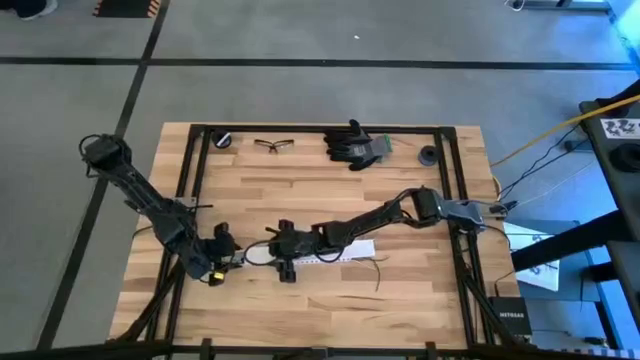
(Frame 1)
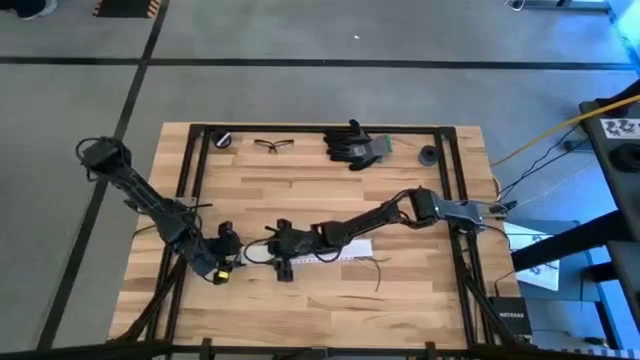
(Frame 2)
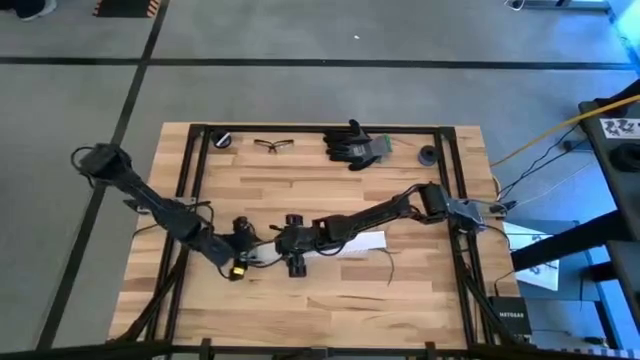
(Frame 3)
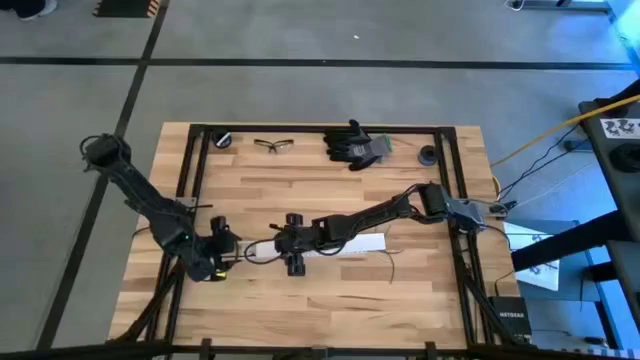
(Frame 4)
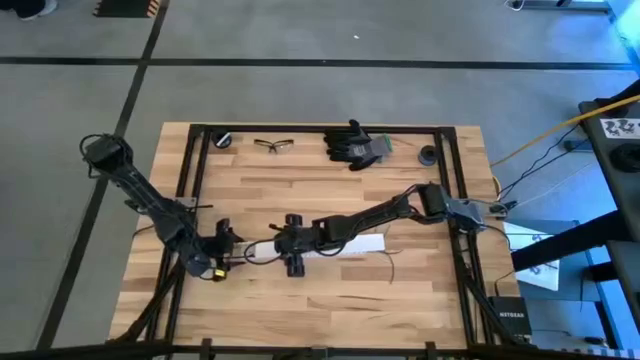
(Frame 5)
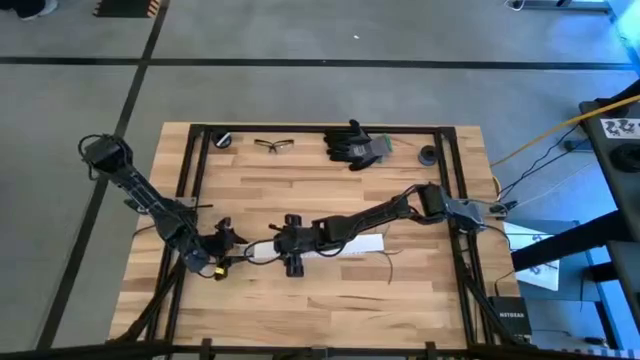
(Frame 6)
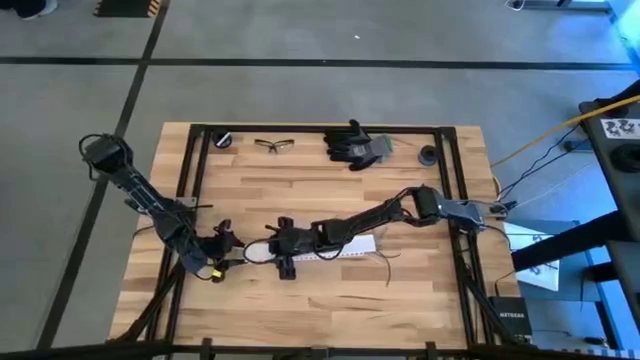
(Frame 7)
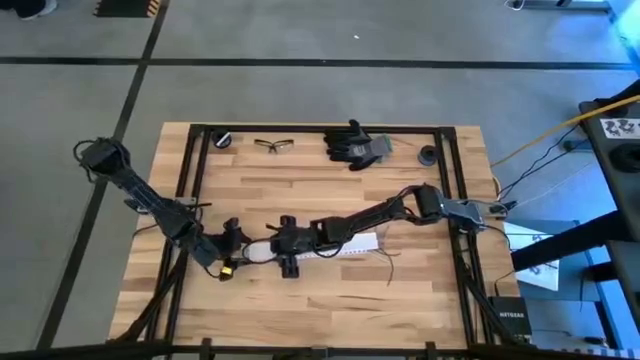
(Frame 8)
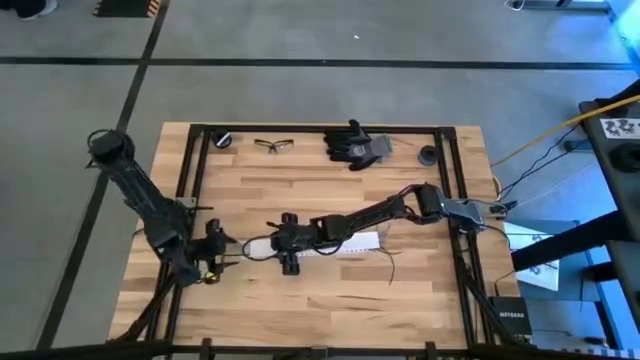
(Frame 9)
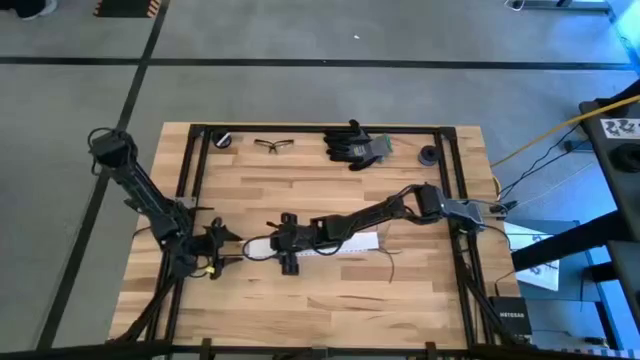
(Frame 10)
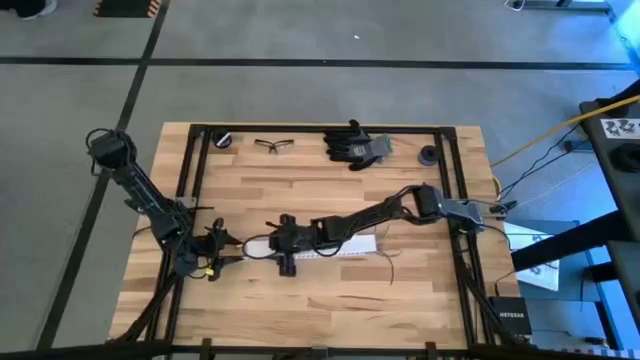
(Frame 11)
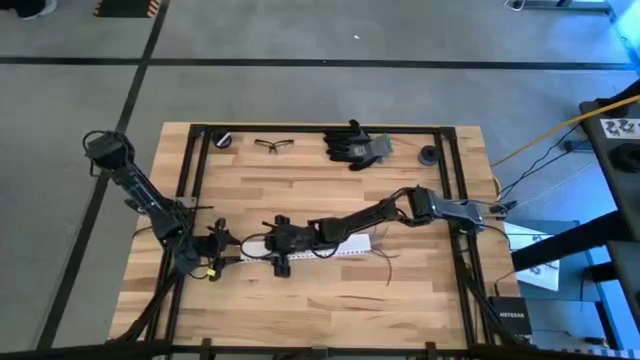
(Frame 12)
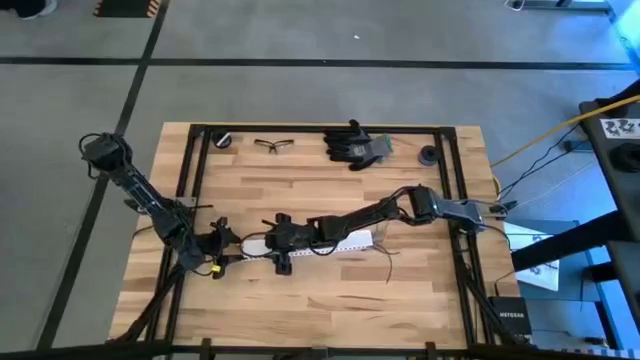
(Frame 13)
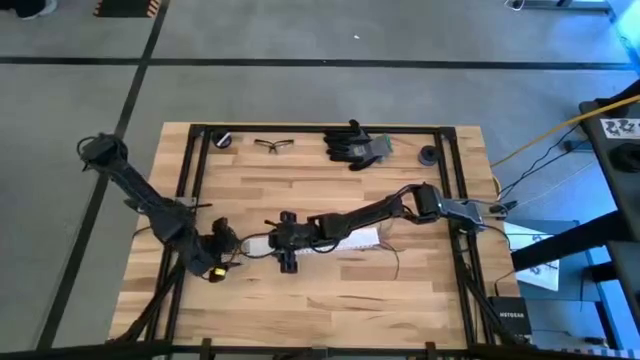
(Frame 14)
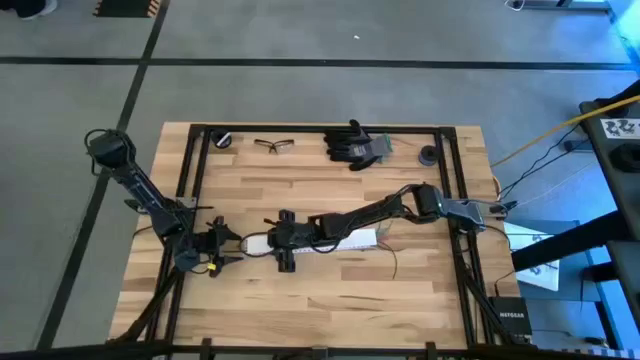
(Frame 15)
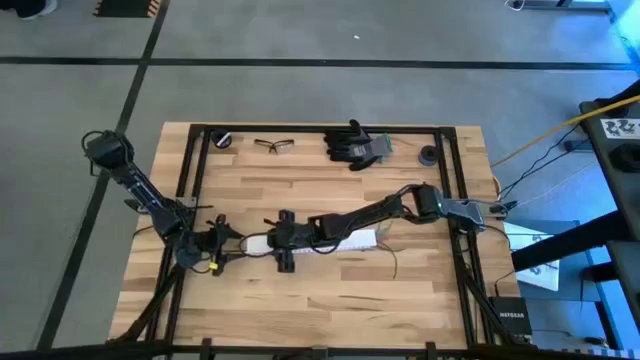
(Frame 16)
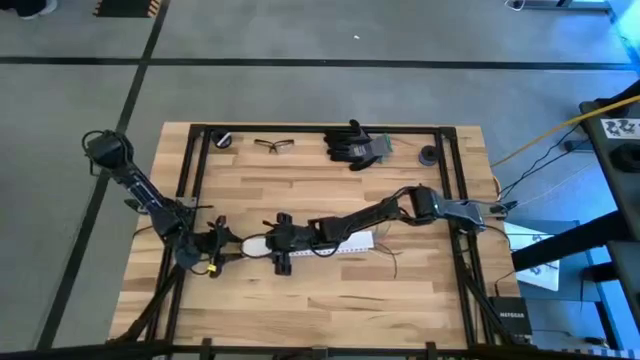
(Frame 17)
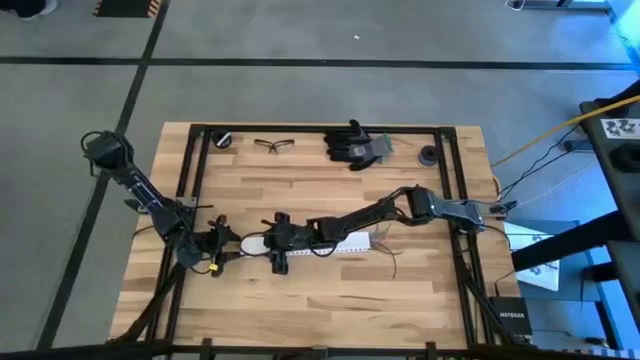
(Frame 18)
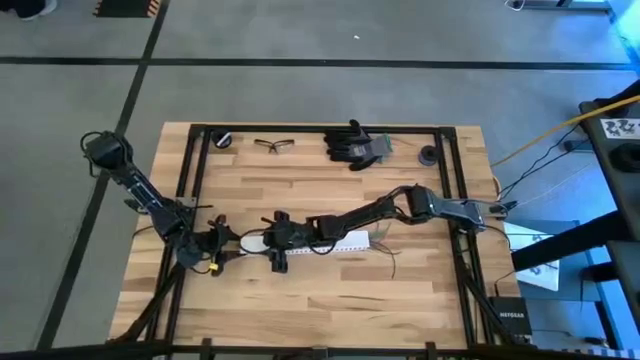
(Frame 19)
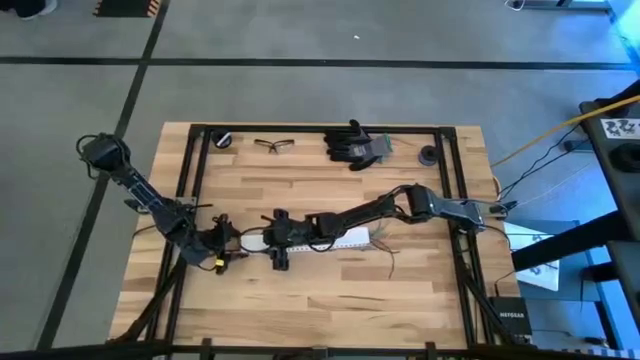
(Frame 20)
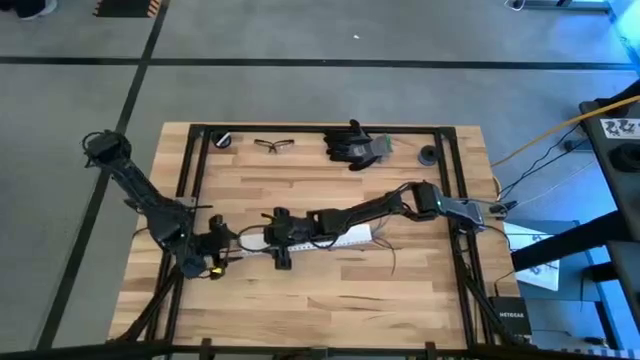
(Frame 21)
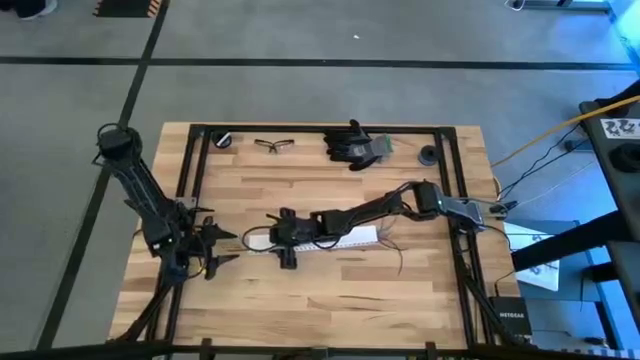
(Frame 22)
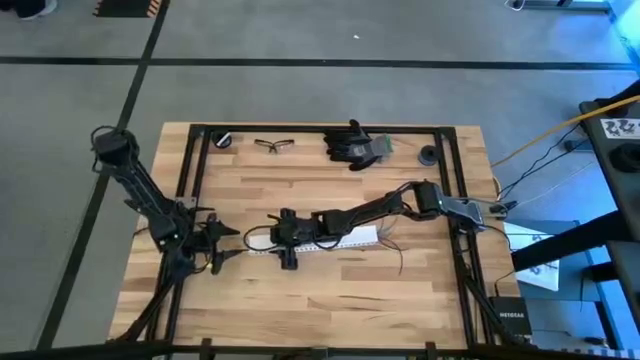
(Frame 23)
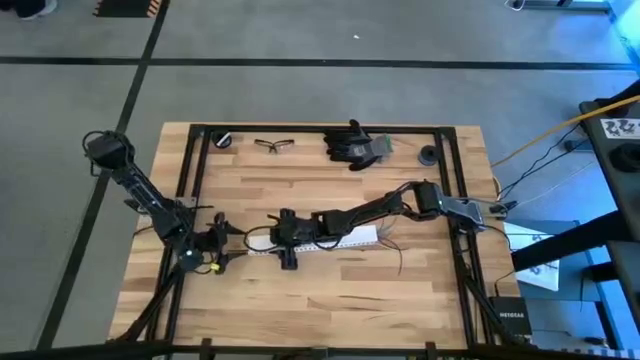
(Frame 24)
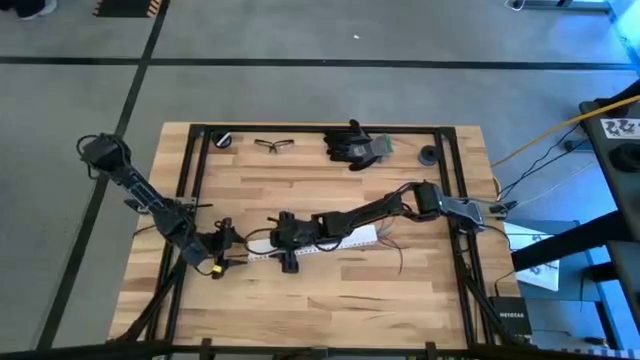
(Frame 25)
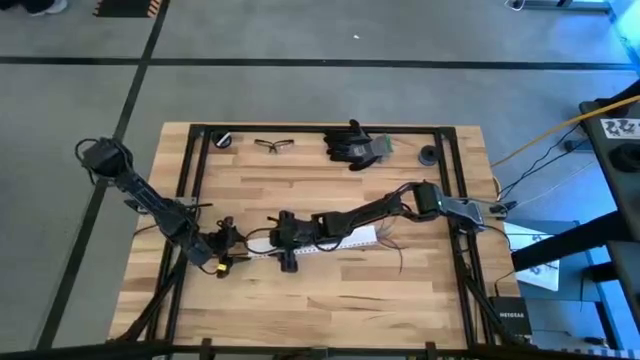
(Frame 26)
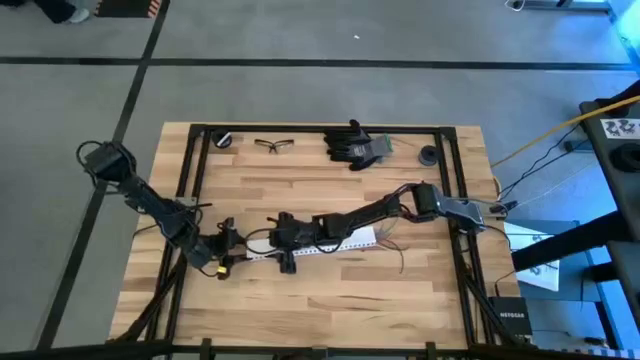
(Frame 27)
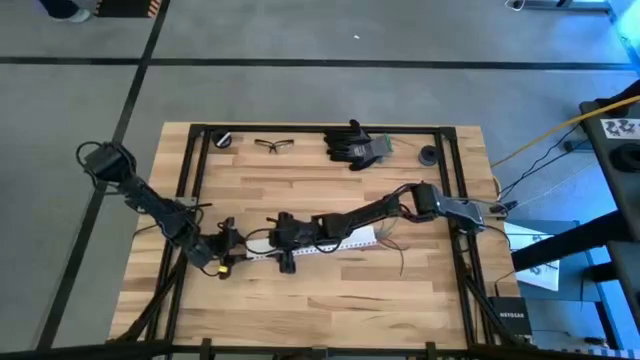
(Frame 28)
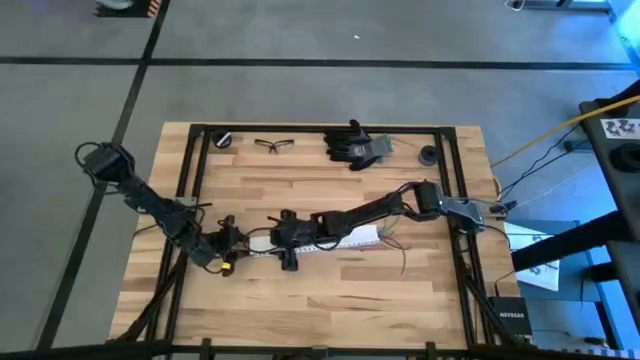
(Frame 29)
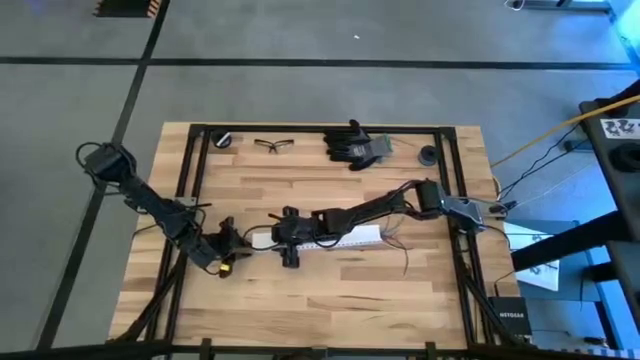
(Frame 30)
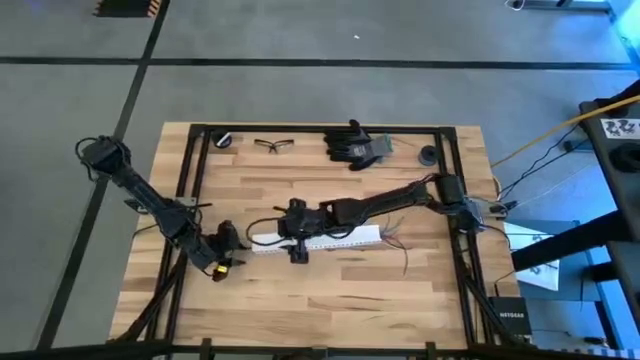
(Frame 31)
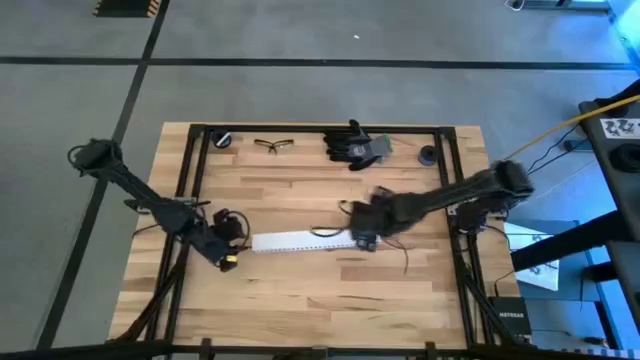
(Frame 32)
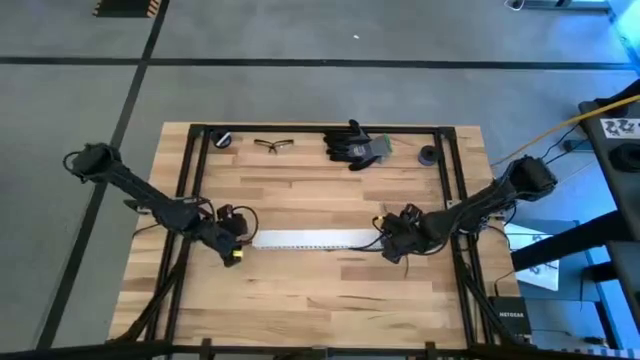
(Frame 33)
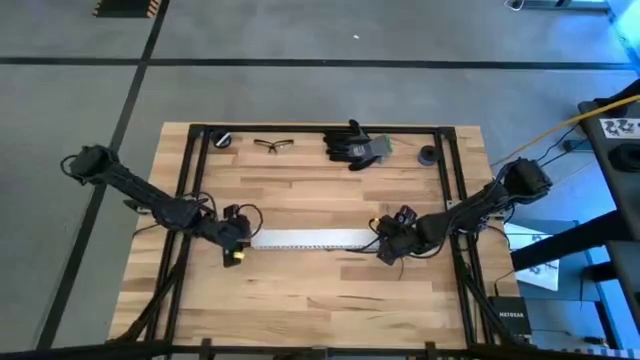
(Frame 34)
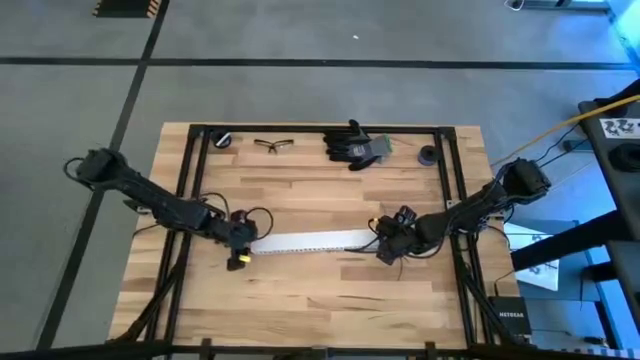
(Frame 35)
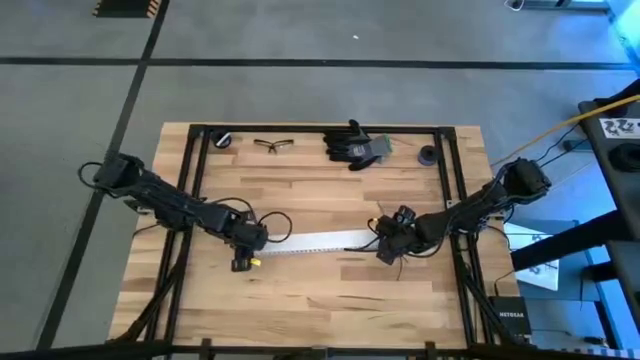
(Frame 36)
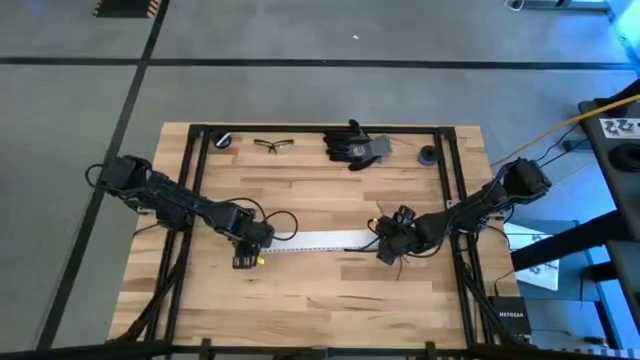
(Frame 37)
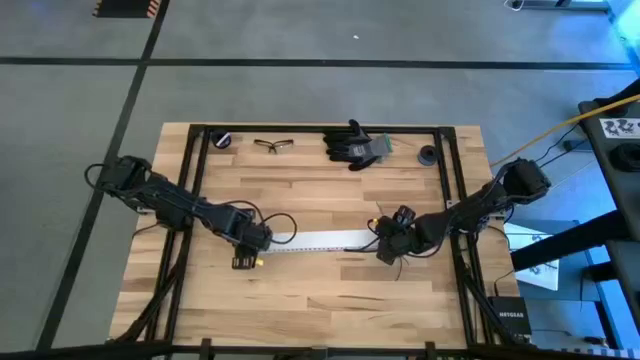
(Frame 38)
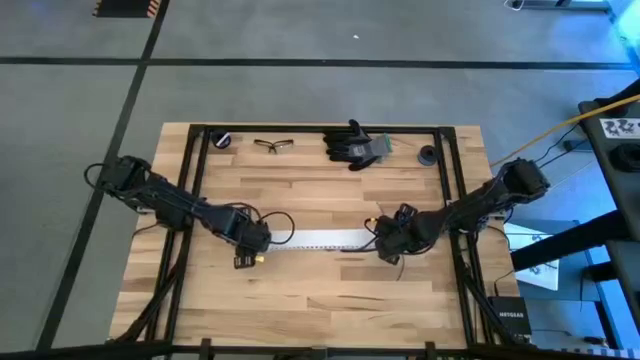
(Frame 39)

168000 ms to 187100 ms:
Task: Ziptie cables
Close the white cable duct

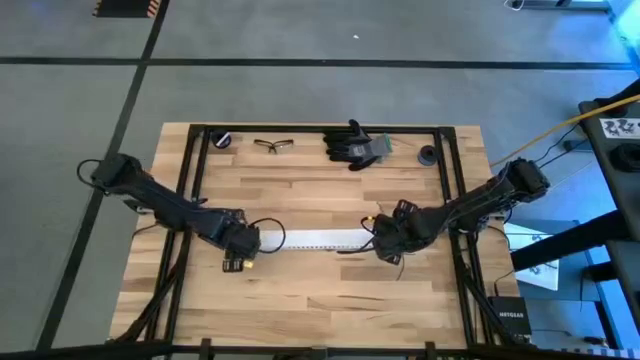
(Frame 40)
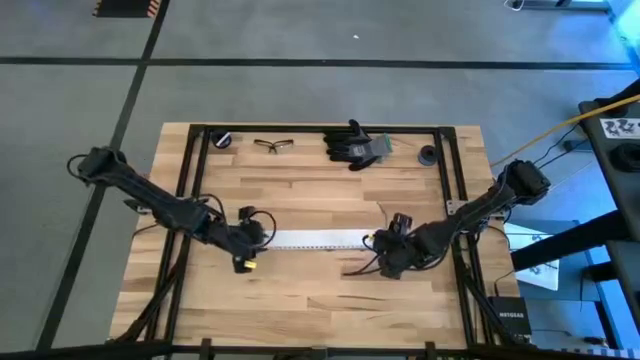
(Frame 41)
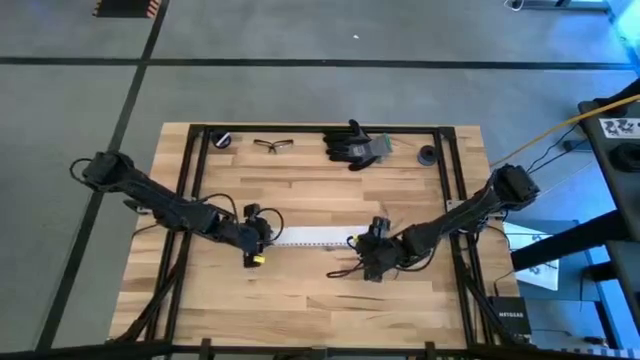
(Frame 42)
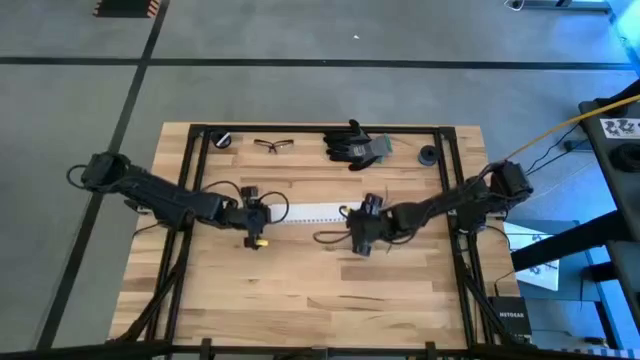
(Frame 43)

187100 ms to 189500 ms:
Move the white cable duct to the top center of the table
